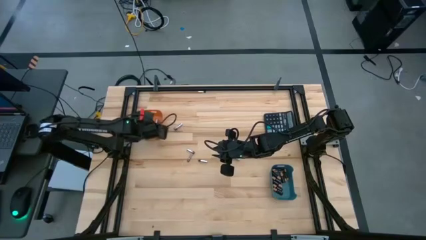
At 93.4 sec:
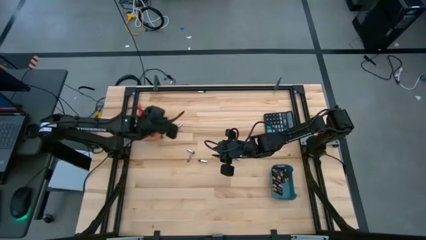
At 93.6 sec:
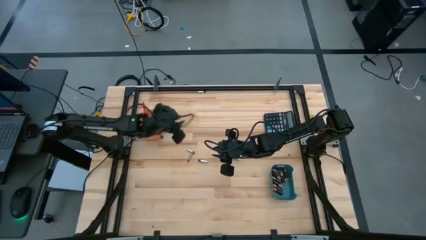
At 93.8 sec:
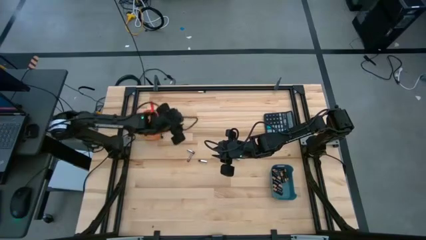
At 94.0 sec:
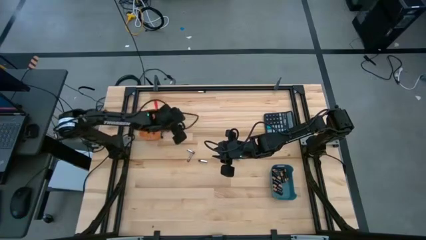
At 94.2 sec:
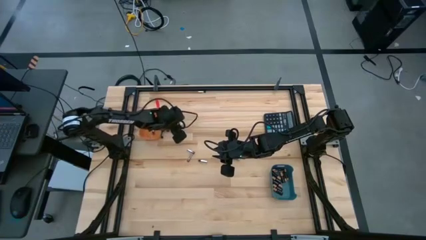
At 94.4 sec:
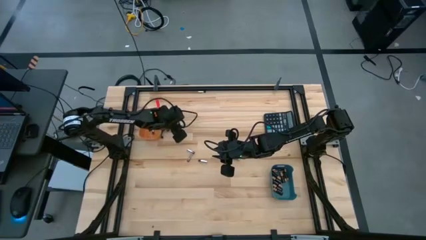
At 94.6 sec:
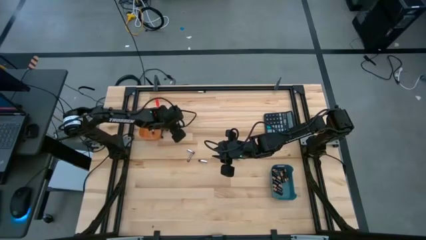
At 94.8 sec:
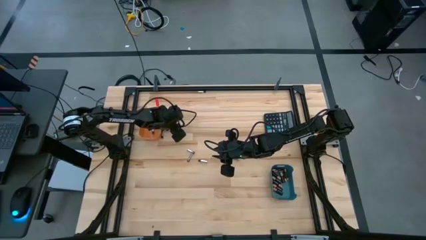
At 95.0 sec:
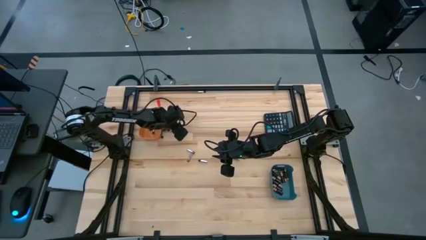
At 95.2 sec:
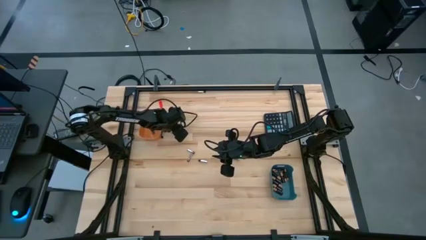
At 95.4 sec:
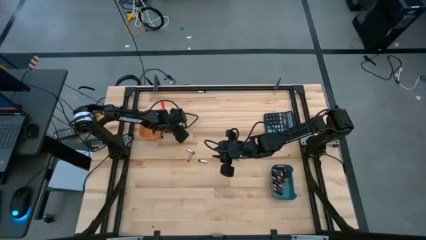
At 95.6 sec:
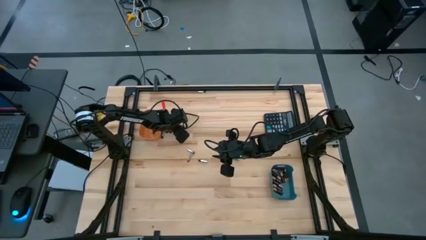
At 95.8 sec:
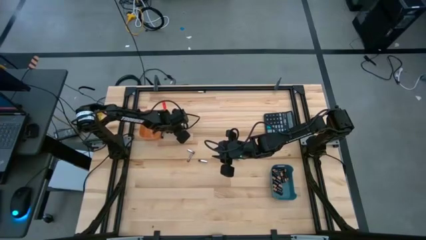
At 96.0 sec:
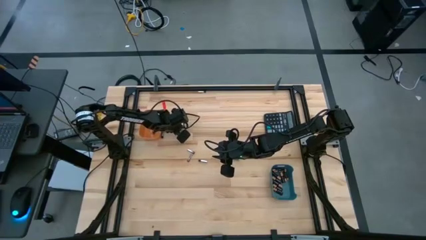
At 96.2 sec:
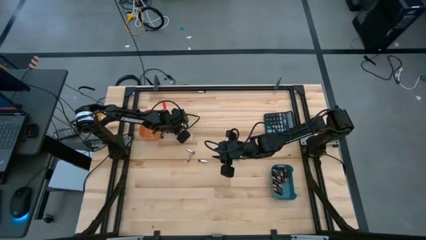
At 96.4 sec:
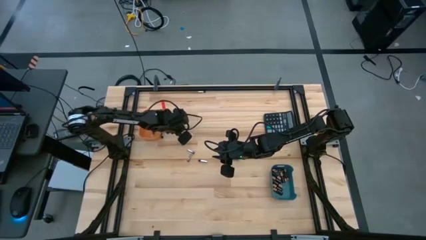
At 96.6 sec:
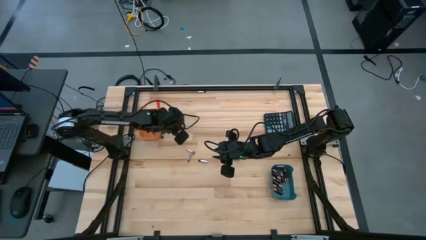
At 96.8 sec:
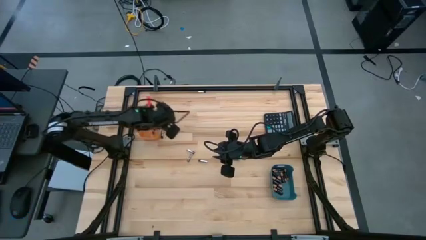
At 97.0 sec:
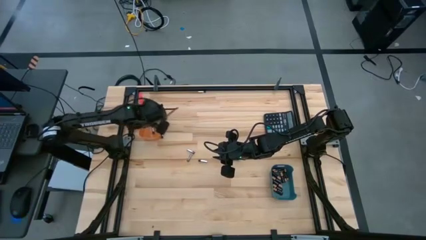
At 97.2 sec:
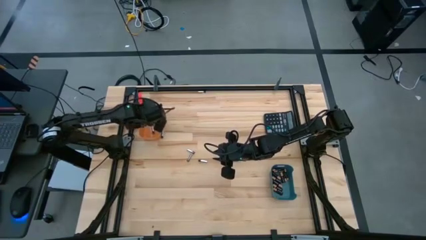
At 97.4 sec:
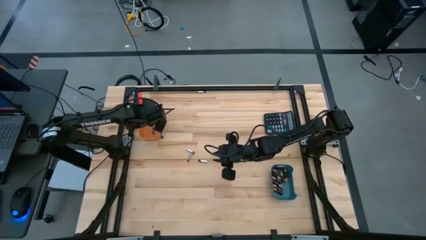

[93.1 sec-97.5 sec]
Task: Sort batteries
Put the silver battery into the orange bin

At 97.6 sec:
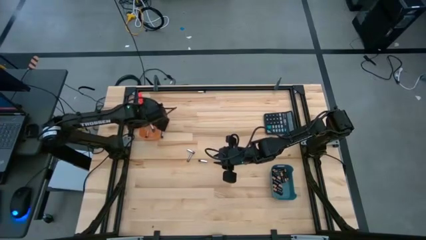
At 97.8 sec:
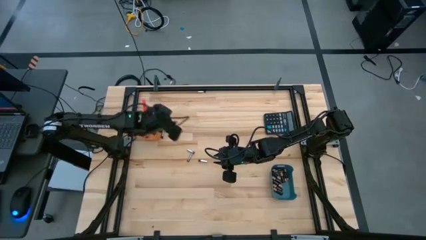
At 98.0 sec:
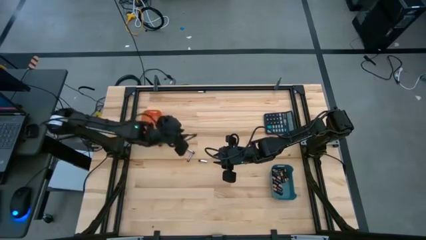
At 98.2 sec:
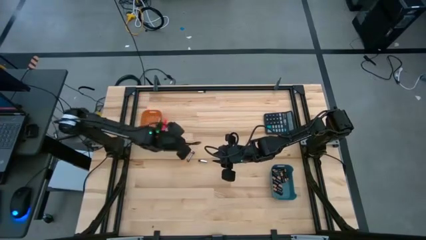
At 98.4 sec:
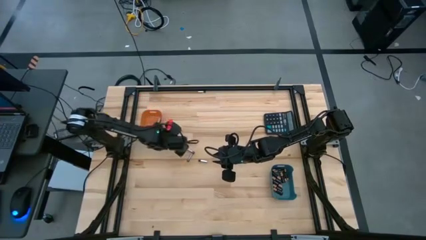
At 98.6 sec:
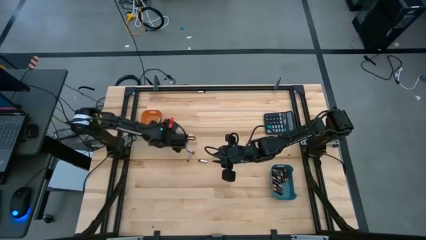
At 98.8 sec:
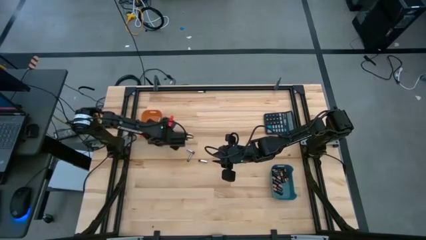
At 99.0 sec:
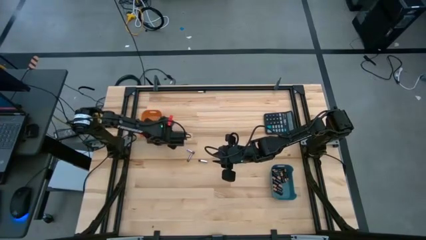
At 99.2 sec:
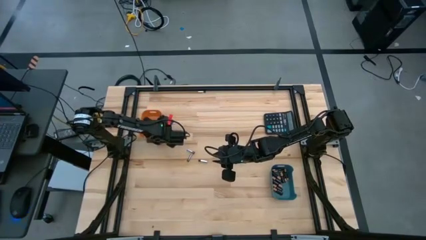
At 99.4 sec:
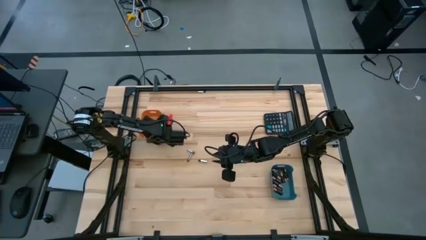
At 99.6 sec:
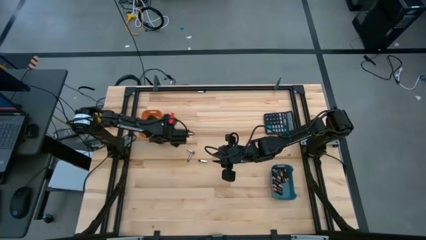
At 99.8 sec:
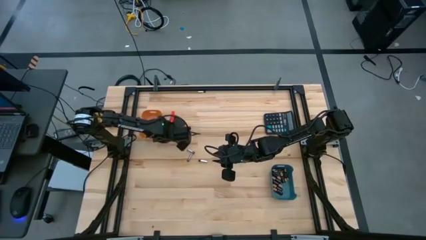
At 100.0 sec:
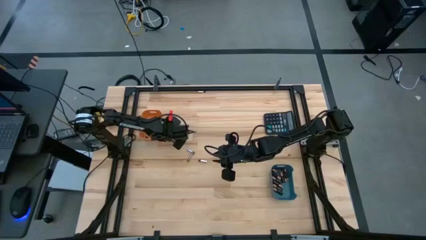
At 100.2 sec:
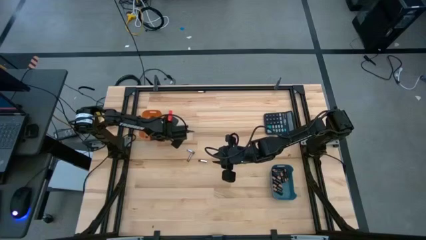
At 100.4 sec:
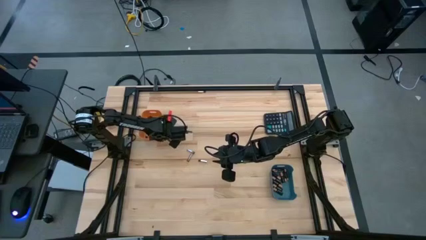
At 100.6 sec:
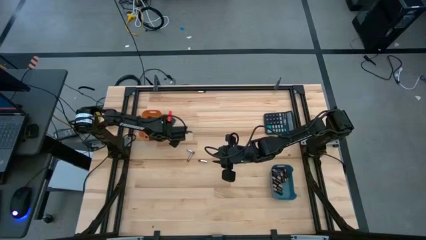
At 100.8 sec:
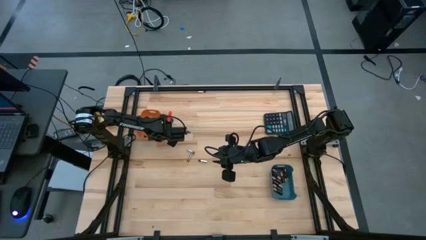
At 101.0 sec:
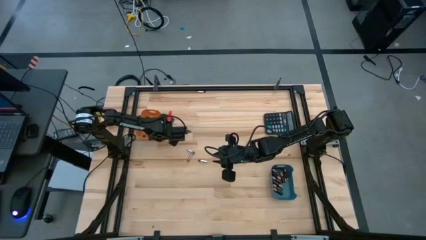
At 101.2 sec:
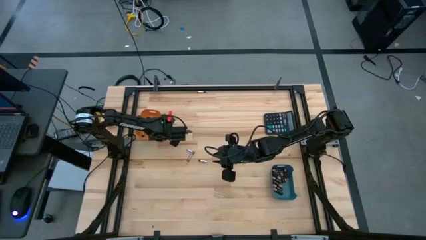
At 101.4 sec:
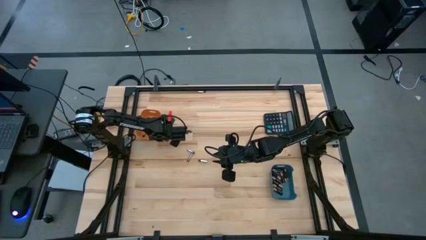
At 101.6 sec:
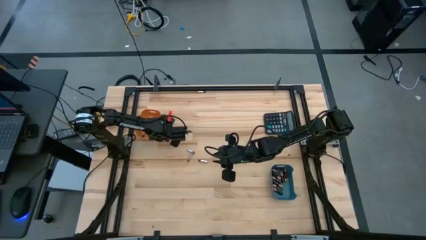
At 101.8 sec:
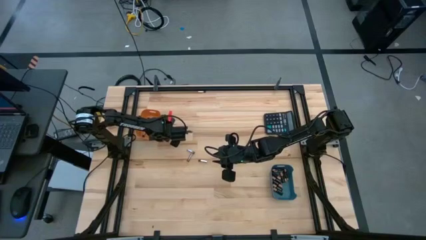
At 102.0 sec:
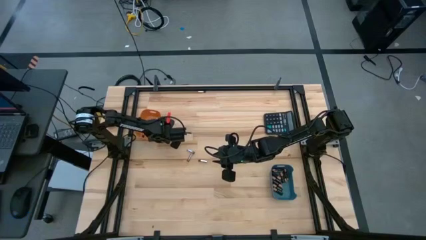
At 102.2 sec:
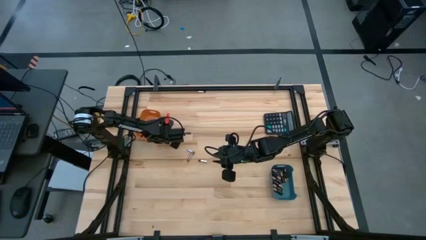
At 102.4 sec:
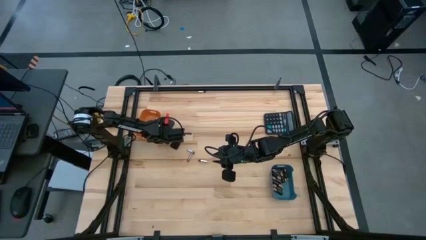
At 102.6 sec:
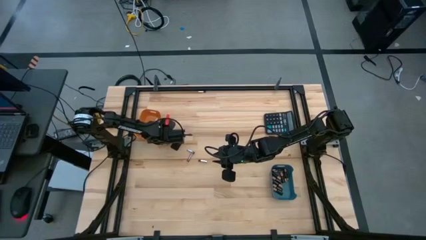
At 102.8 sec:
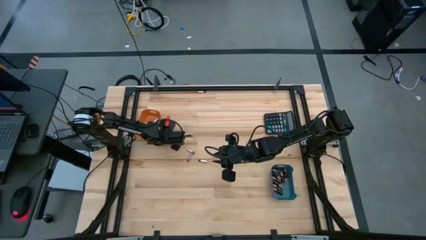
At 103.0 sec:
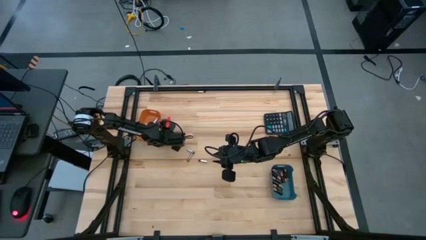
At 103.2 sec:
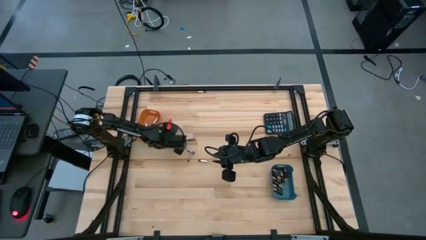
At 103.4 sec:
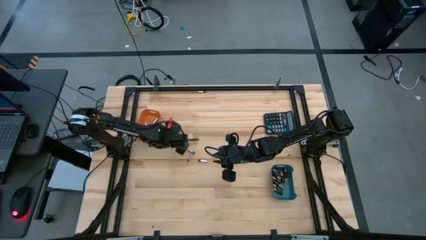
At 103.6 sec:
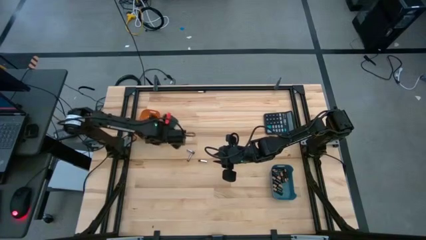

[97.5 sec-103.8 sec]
Put the silver battery into the orange bin

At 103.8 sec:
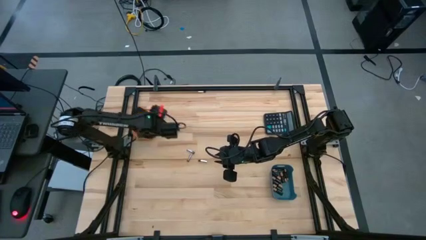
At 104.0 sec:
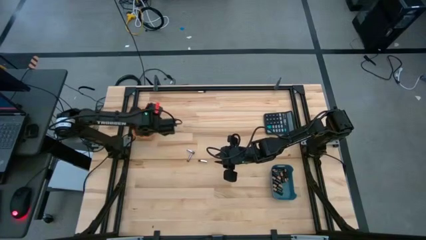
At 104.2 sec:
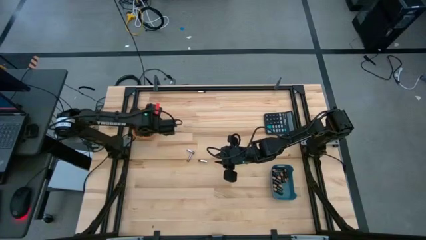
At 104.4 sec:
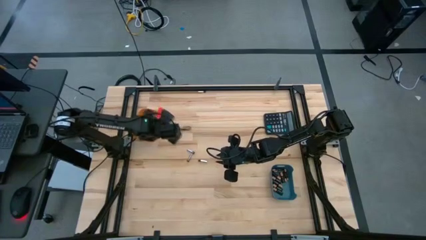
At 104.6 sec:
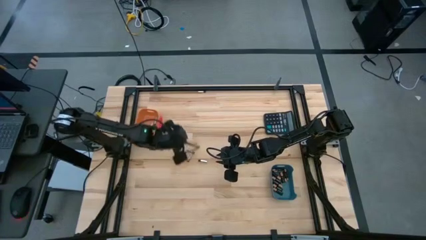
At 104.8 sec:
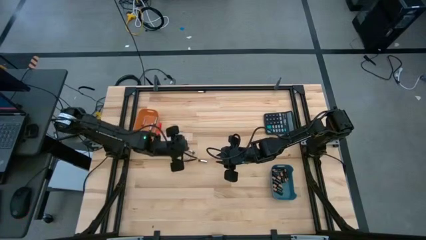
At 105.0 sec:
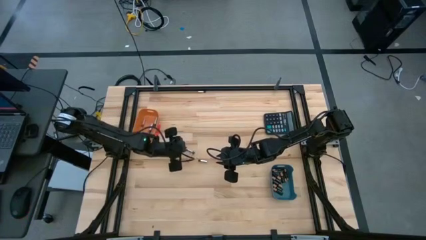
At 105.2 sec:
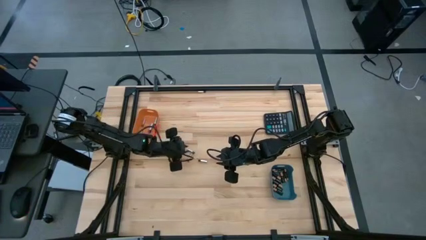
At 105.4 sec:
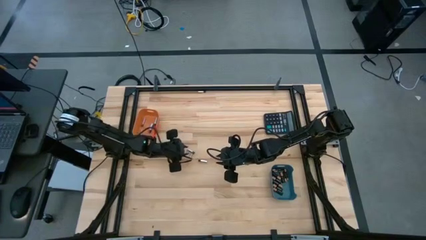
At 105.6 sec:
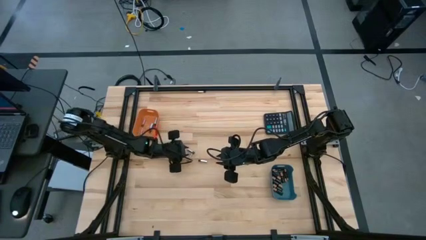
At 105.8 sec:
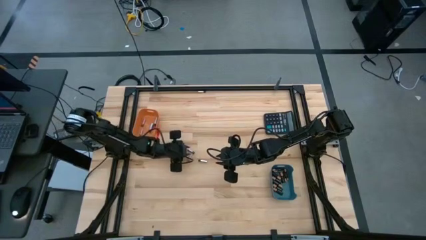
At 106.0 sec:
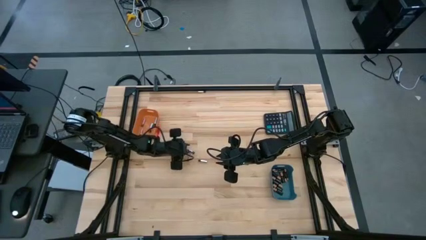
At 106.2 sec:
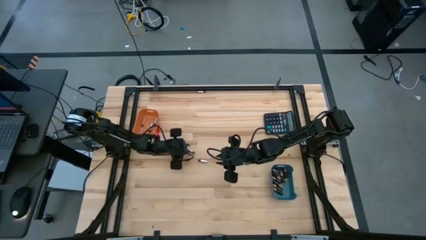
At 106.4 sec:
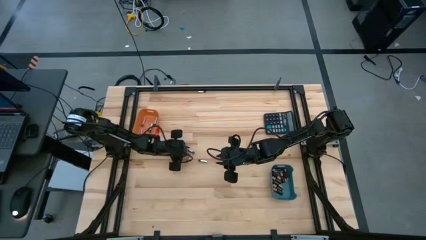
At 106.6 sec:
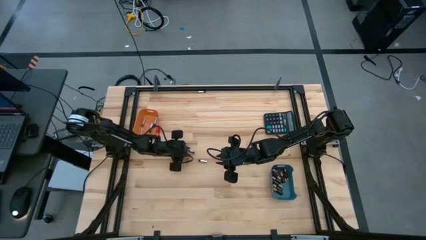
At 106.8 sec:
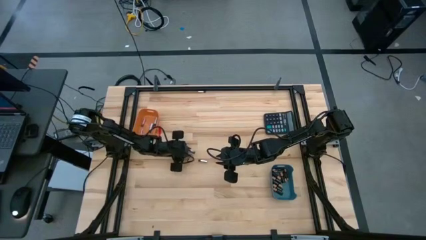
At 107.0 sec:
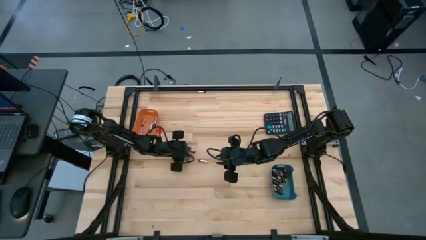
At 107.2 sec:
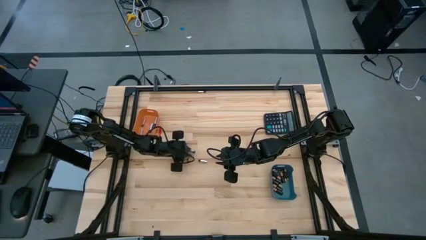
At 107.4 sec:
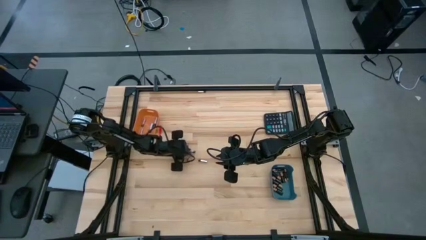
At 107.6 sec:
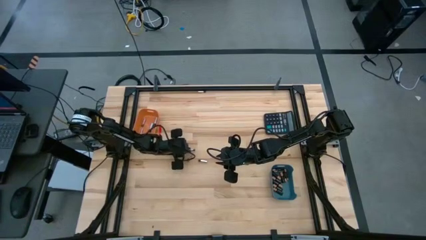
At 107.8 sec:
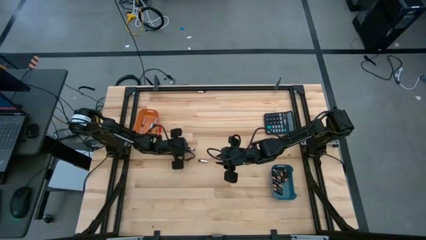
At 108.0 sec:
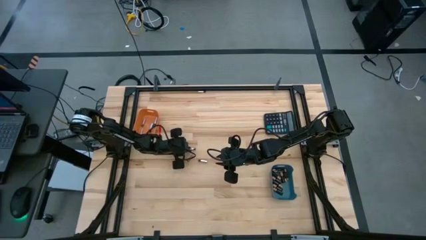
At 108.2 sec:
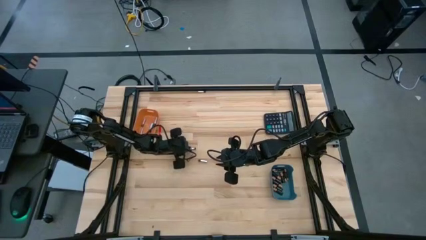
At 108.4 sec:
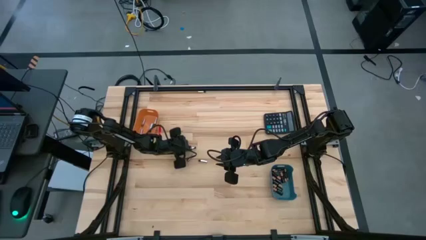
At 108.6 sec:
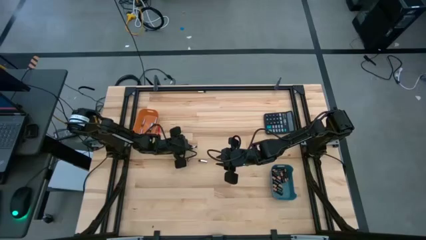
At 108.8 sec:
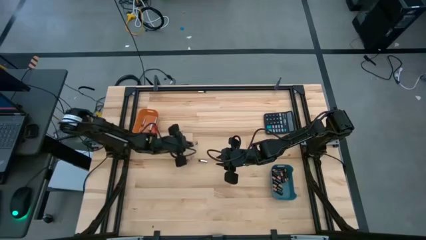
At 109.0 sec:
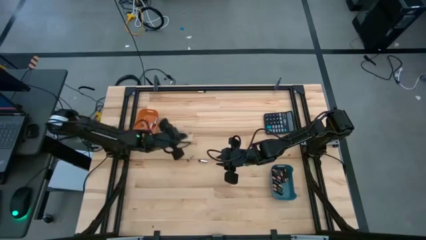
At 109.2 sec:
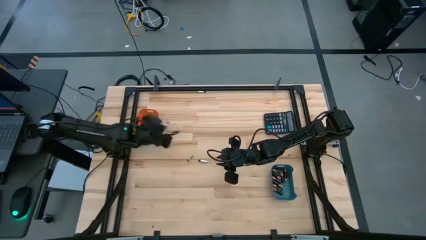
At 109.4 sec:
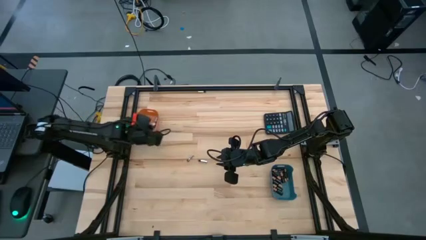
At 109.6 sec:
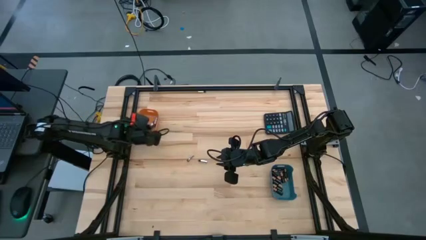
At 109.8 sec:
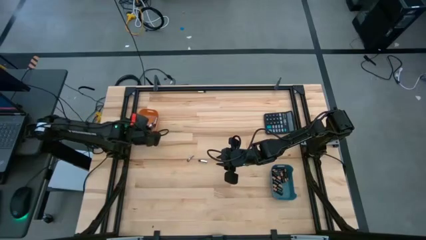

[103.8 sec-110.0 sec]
Put the silver battery into the orange bin
